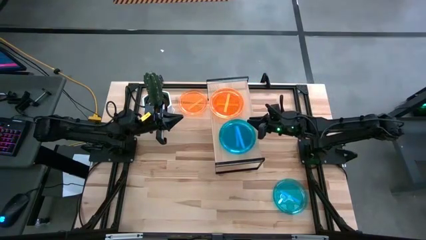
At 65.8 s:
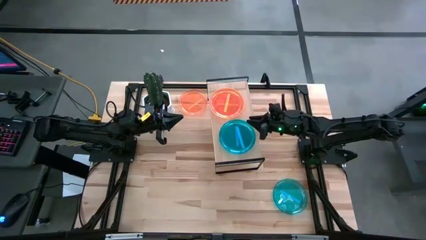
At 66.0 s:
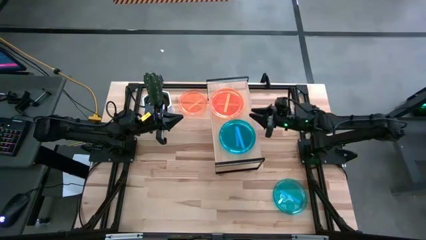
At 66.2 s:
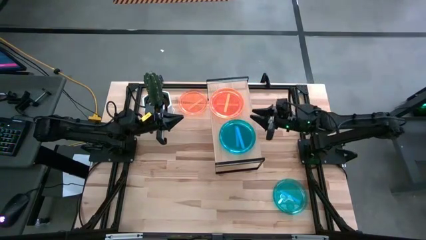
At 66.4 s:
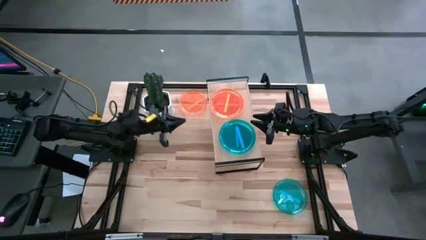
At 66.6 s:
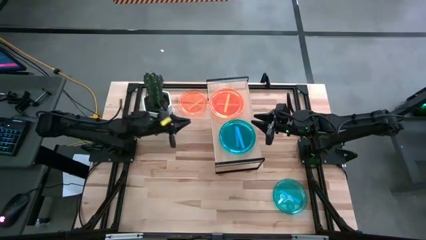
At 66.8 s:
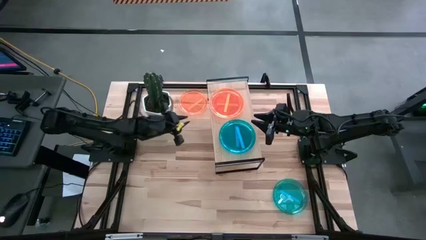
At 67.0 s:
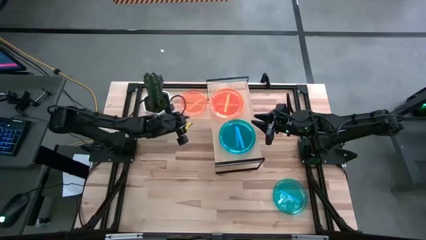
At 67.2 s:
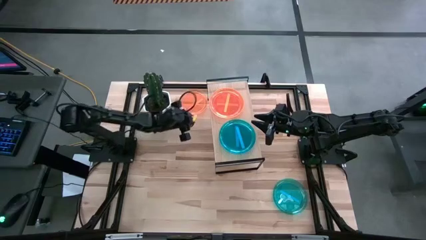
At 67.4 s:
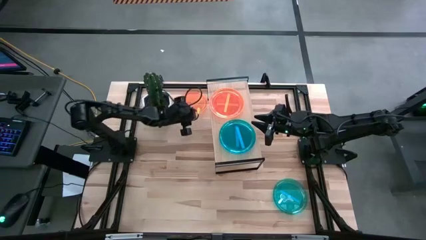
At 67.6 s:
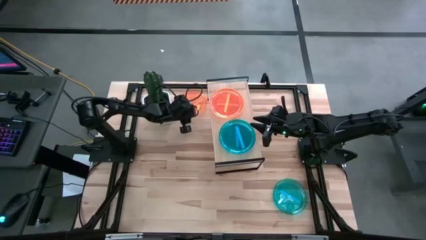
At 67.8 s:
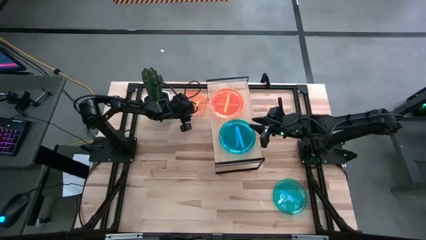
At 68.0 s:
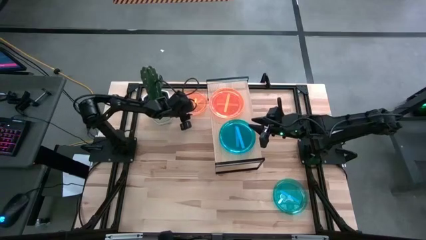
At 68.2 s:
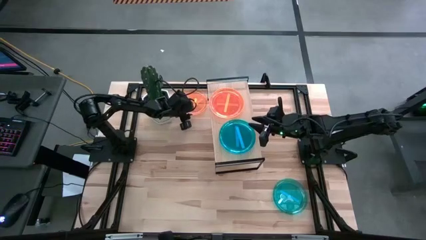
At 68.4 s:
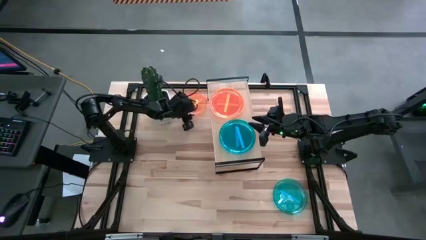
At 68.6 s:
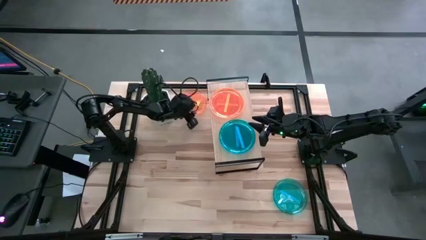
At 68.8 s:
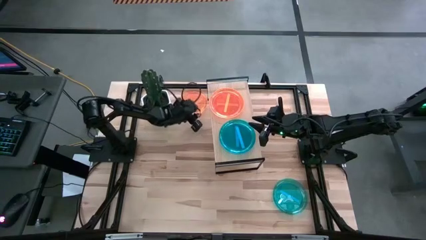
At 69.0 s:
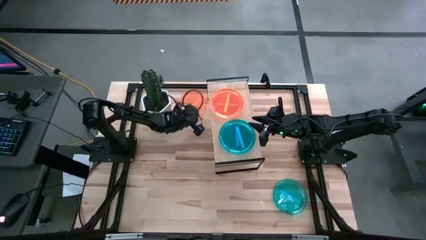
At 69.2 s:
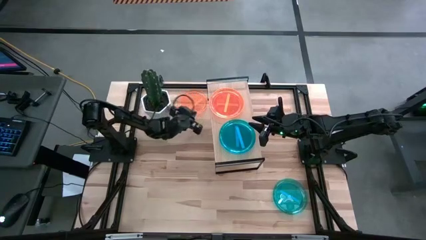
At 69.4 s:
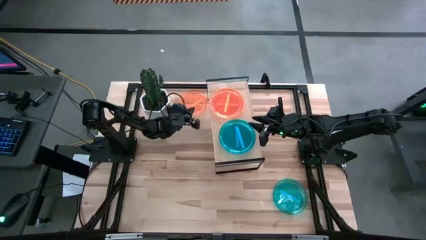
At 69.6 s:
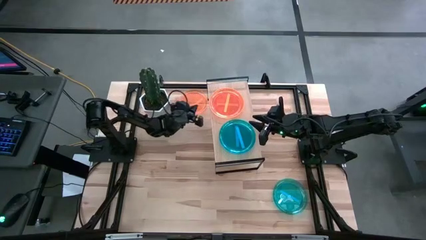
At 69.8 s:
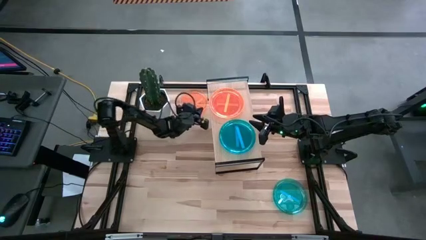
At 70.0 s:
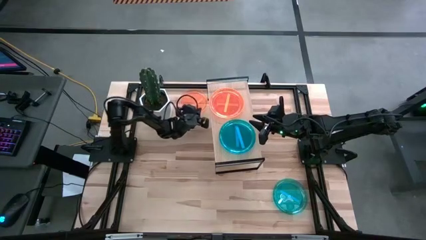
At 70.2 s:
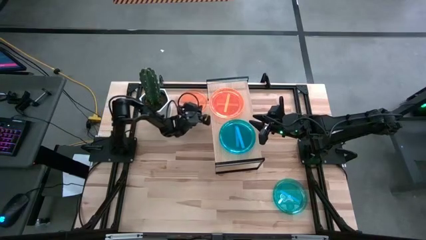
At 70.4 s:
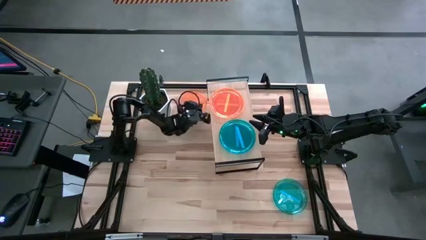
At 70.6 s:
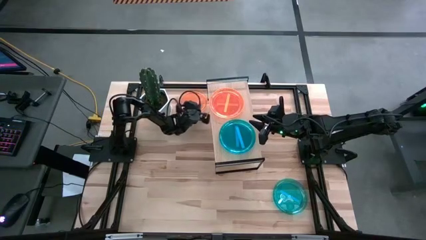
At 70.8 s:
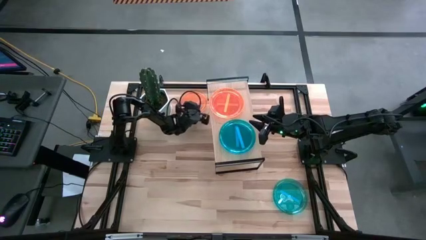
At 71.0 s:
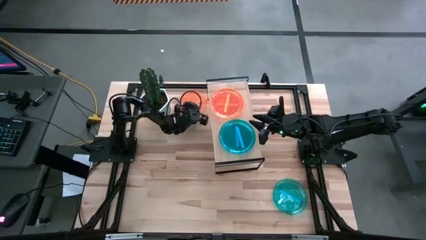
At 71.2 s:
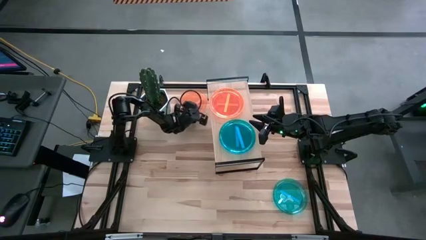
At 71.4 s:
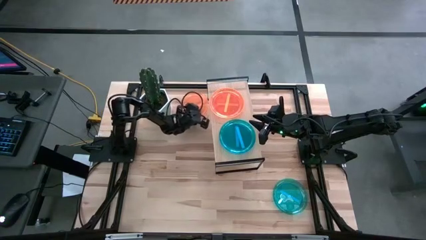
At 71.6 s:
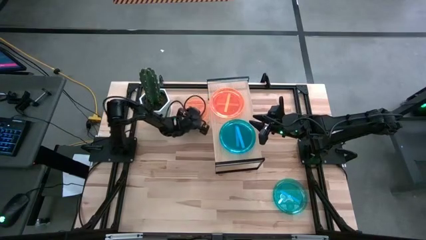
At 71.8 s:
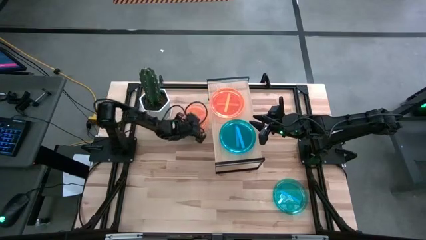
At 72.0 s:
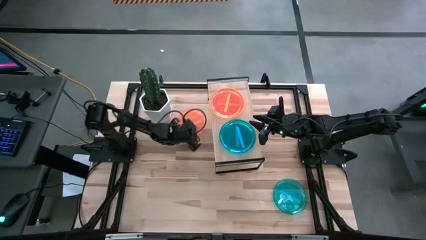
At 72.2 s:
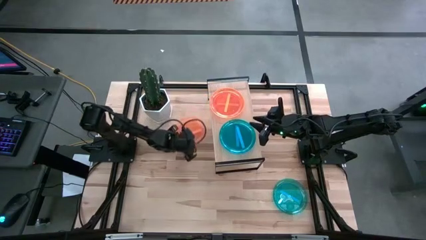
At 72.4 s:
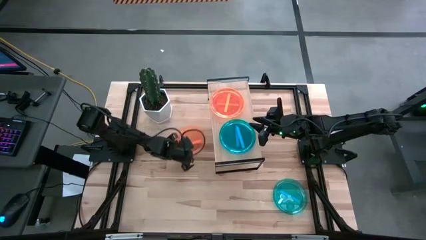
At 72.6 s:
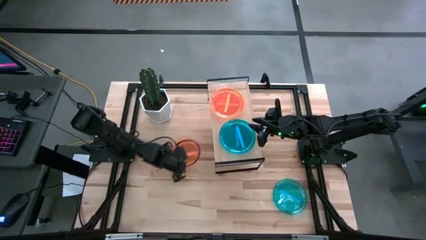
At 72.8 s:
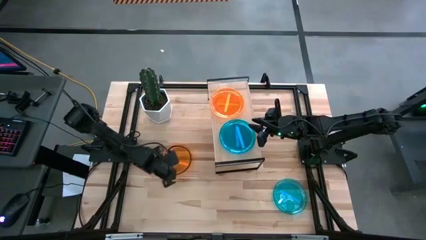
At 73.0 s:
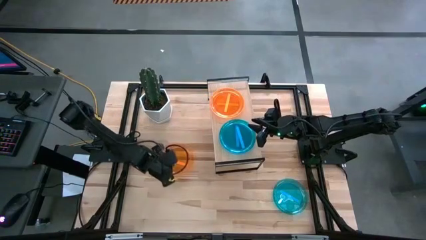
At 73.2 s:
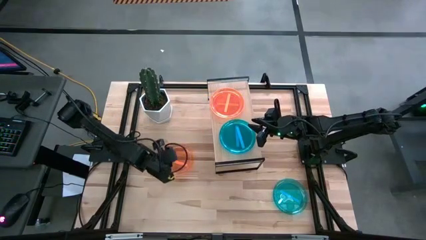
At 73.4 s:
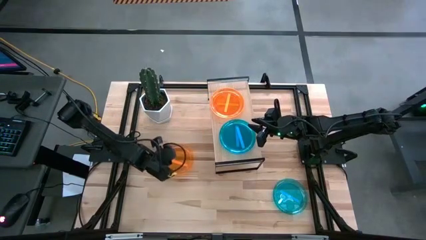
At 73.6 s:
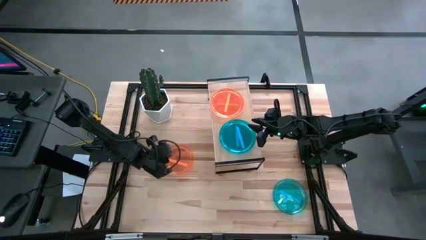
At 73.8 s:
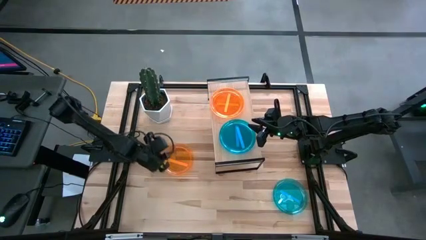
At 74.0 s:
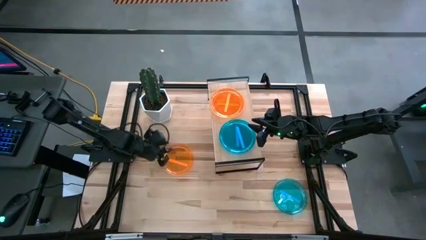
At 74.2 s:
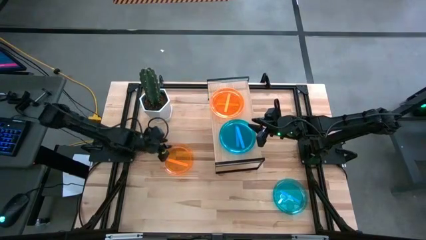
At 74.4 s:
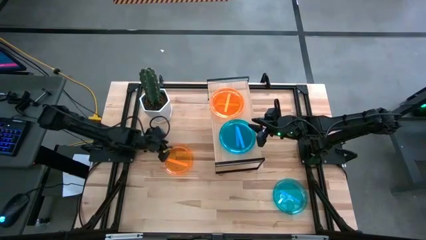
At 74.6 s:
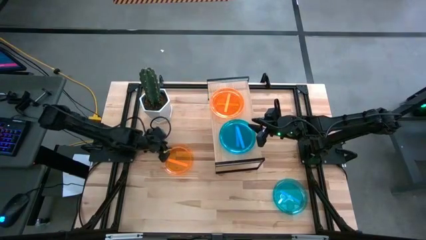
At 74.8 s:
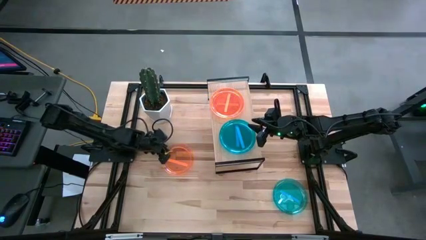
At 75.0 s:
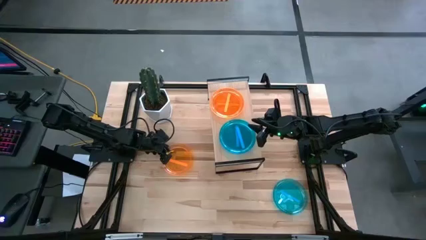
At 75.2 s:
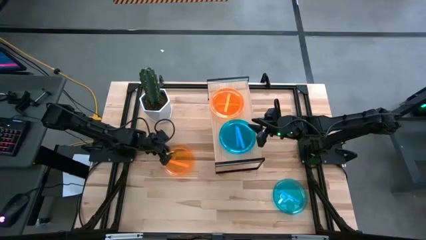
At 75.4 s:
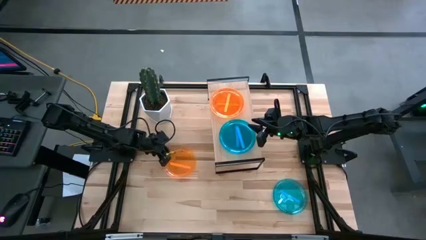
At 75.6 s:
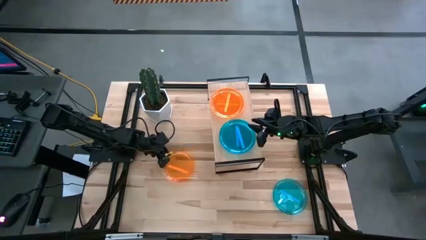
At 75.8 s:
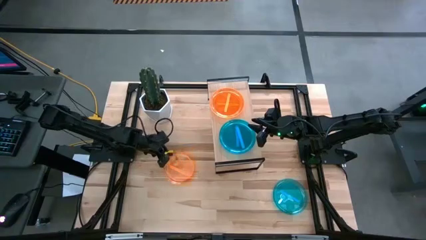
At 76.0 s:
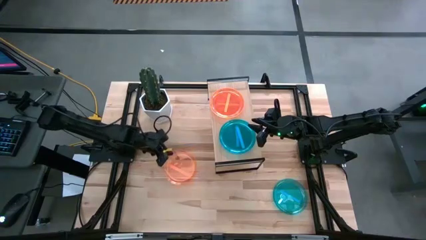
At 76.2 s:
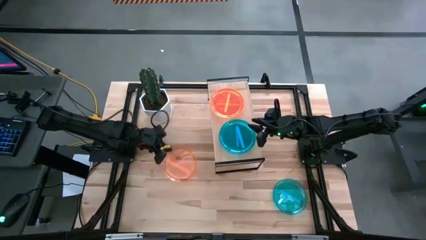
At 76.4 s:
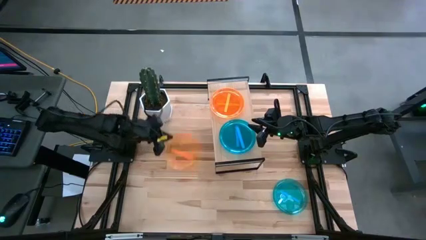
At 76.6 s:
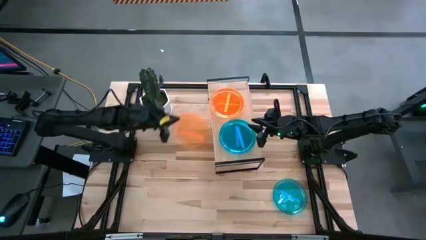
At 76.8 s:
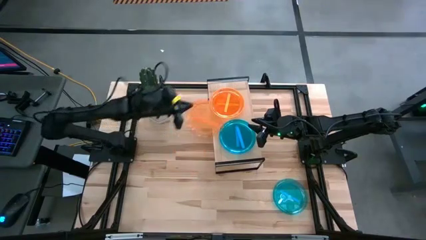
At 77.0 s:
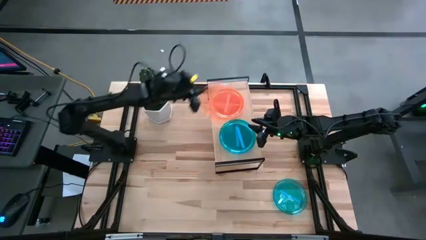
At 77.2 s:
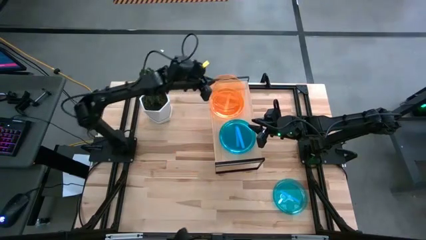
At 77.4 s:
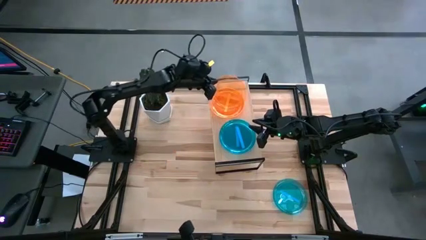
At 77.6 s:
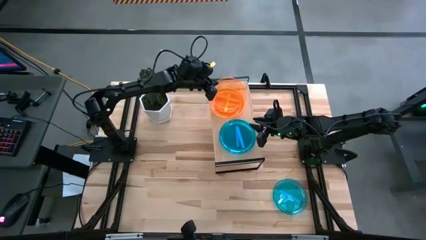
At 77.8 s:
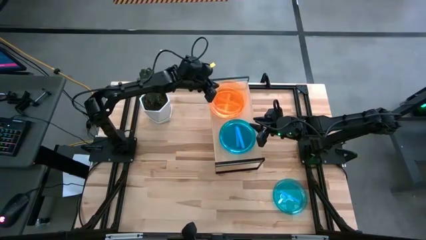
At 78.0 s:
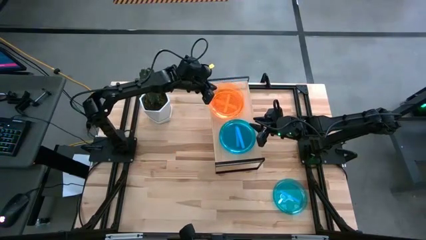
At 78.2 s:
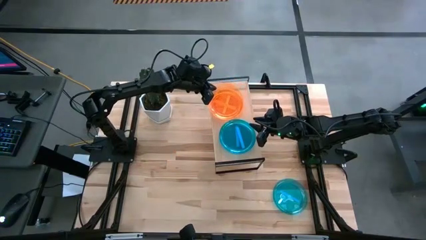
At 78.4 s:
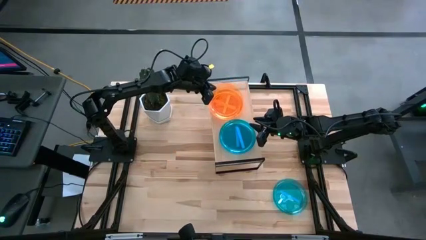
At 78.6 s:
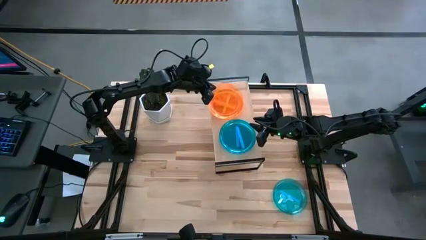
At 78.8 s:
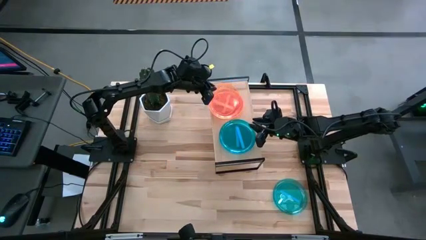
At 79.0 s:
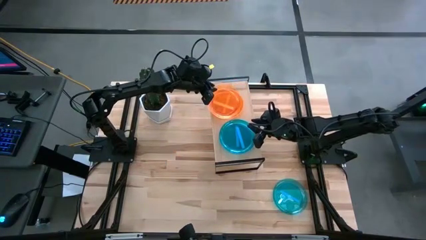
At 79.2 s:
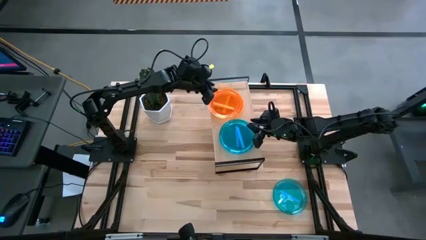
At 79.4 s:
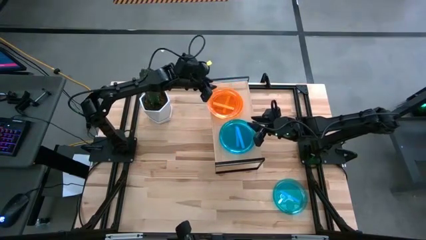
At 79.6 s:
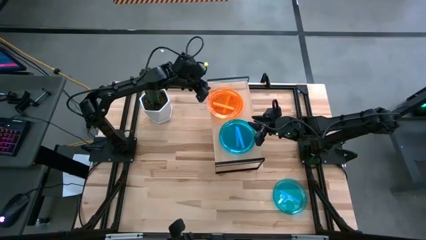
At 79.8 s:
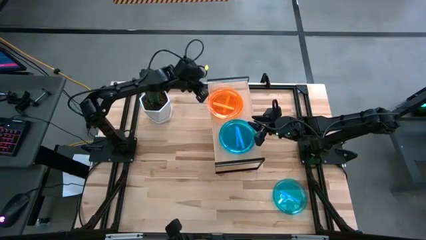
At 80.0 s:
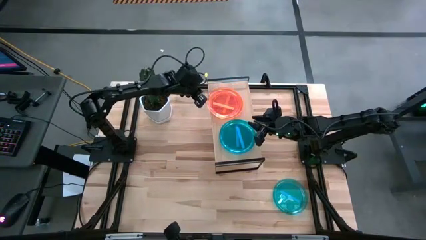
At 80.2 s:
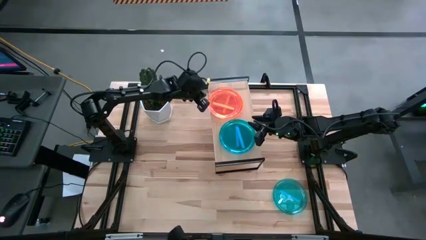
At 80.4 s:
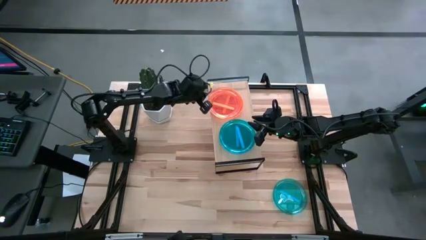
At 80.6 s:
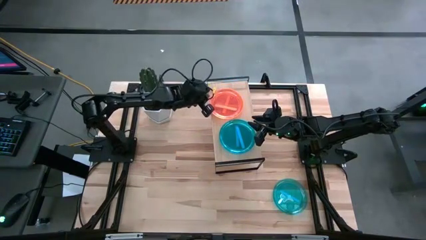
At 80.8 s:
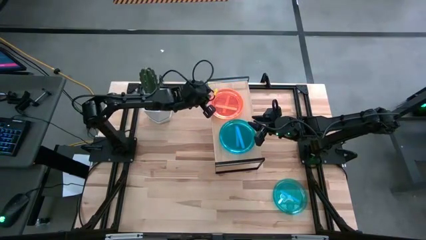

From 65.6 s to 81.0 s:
Task: Place and stack plates onto a shelf
Stack the orange plate on top of the orange plates on the shelf
